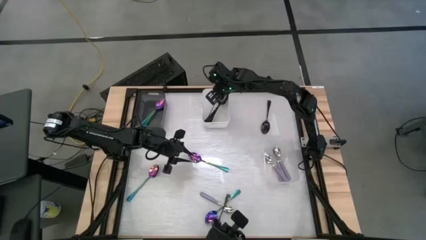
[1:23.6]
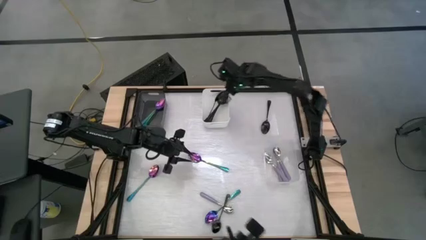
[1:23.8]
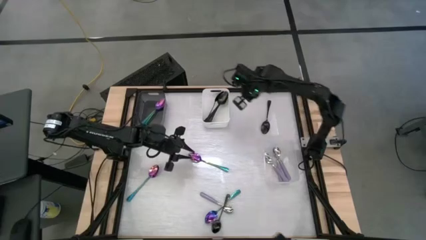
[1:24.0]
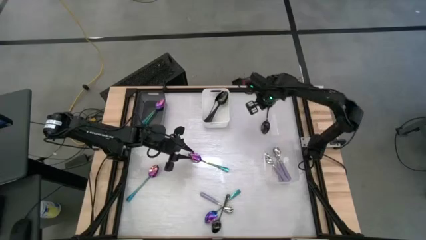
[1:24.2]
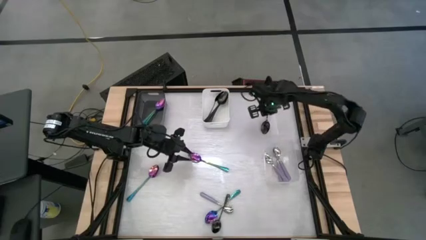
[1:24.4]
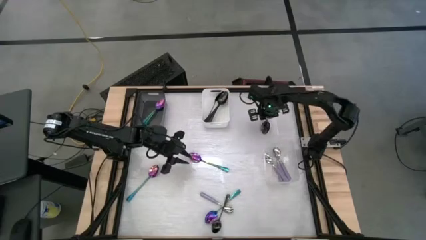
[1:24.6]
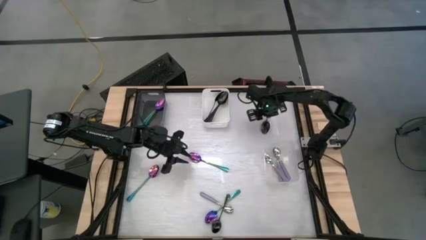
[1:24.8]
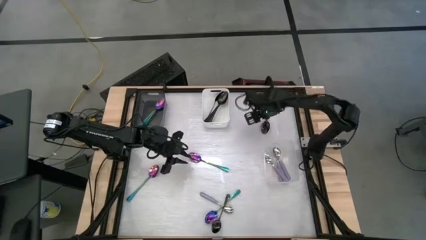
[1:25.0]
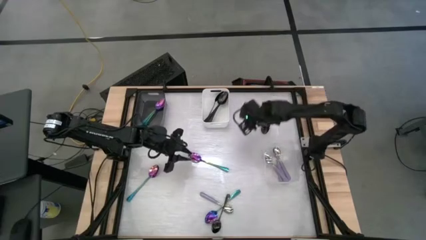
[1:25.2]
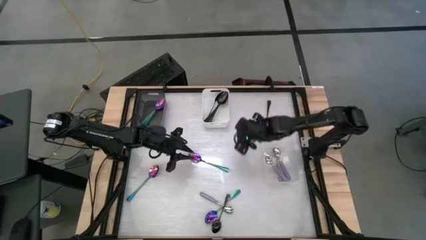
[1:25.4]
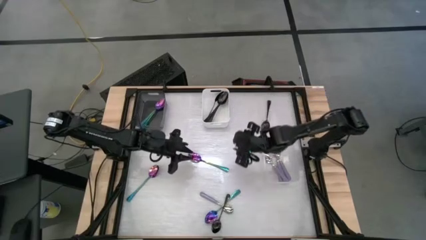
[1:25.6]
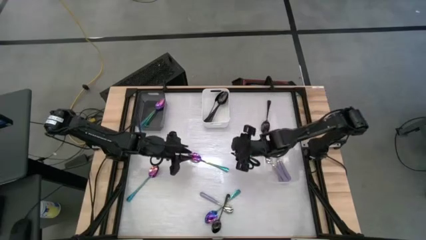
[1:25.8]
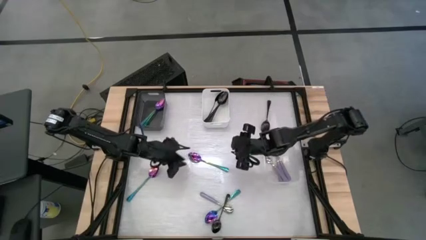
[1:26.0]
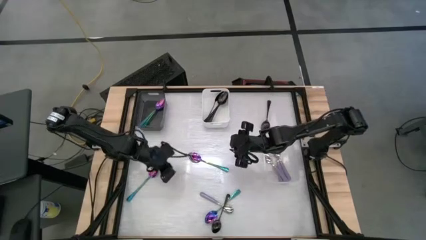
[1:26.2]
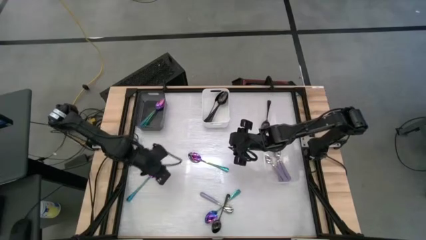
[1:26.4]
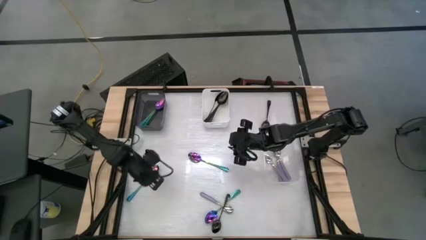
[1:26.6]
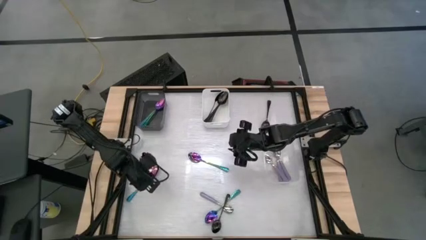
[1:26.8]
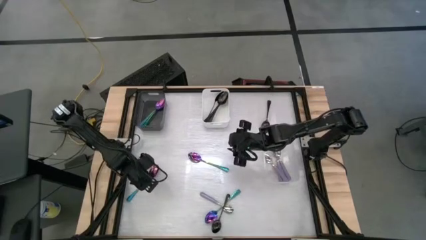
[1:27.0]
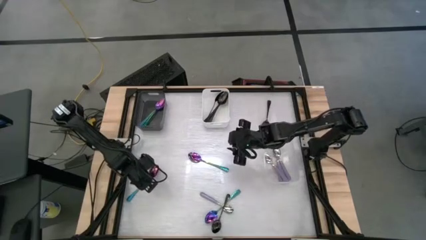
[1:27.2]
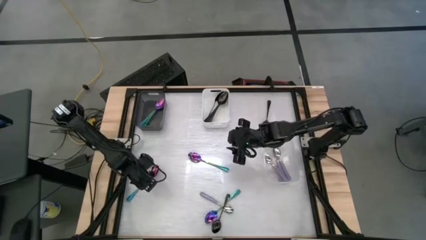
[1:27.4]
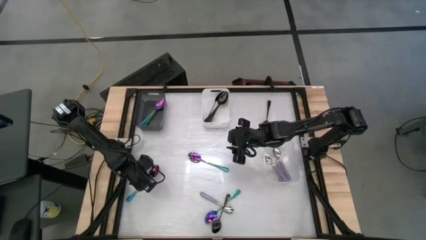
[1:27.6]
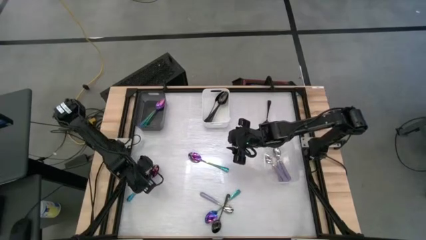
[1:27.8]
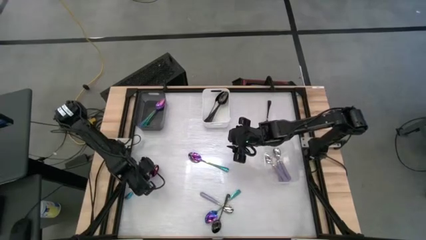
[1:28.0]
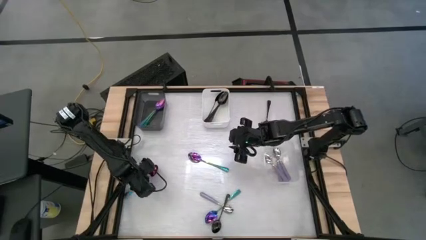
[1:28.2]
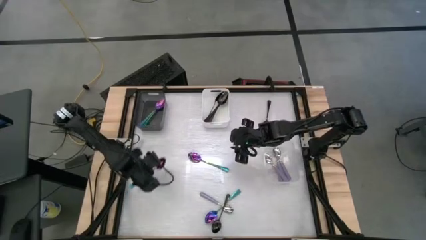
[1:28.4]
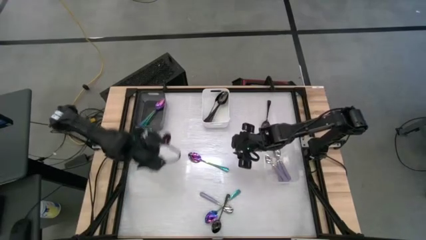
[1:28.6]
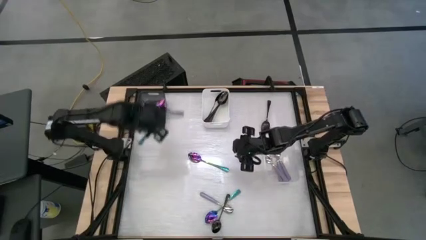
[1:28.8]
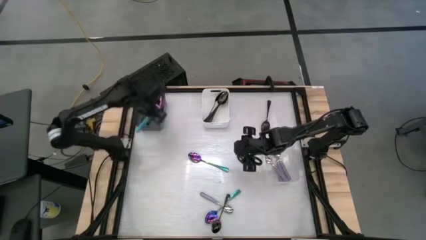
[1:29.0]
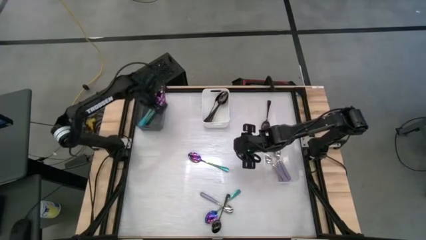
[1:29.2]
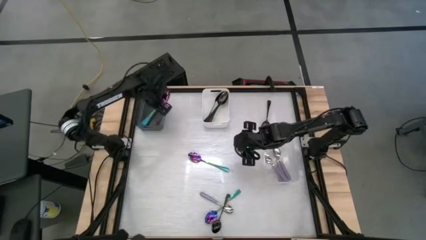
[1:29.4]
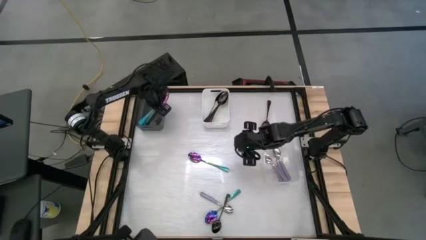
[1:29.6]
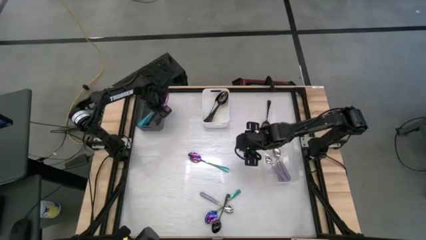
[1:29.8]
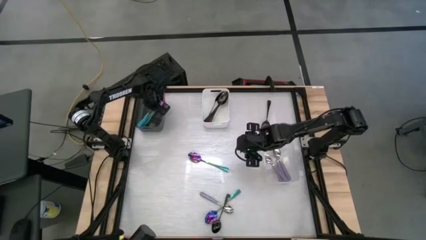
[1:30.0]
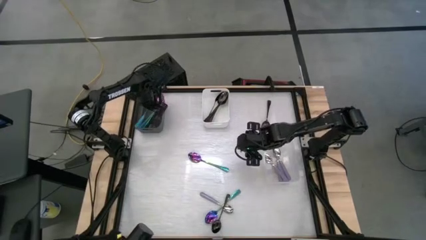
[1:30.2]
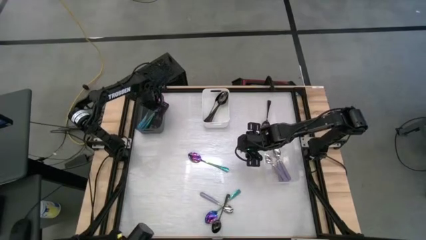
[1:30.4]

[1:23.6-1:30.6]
Task: Sort silverware by color (type)
Put the blue spoon into the black bin

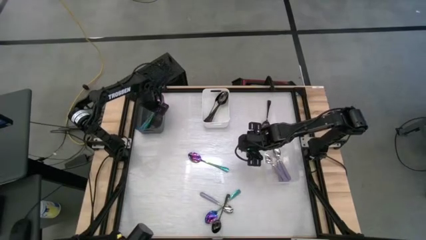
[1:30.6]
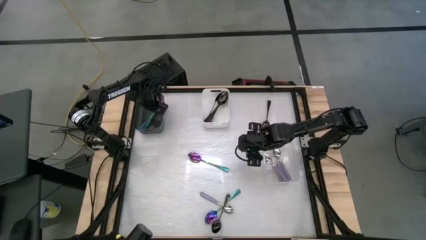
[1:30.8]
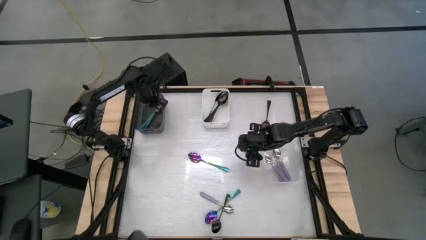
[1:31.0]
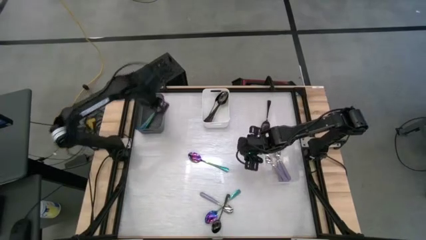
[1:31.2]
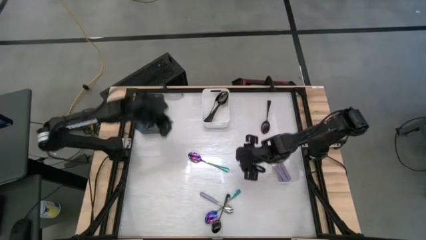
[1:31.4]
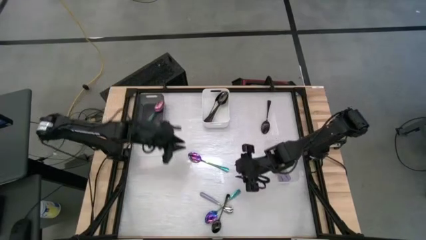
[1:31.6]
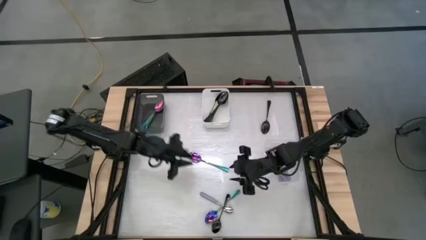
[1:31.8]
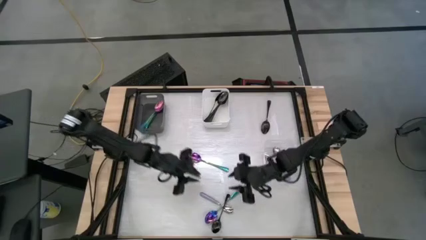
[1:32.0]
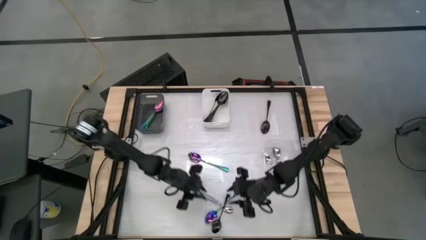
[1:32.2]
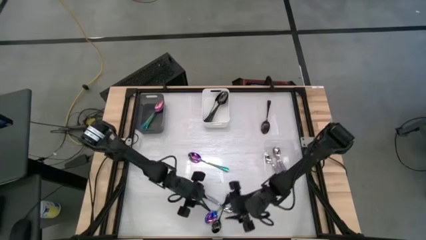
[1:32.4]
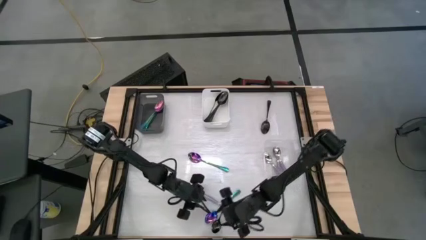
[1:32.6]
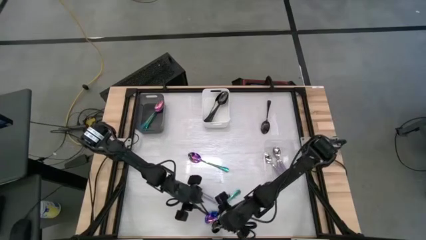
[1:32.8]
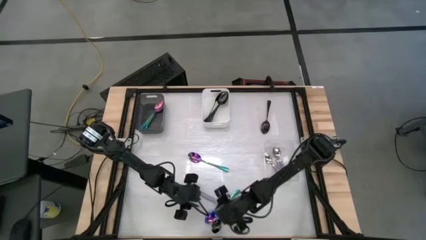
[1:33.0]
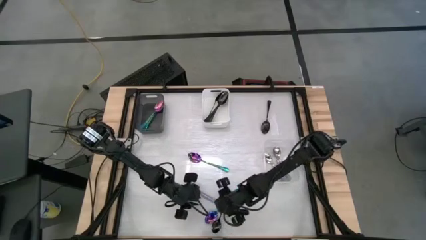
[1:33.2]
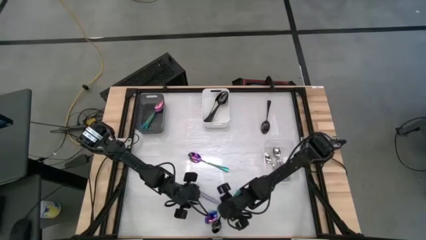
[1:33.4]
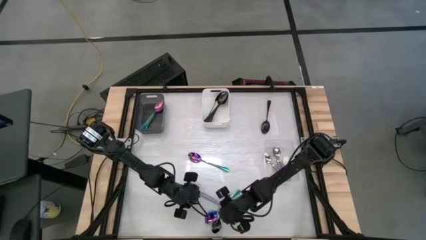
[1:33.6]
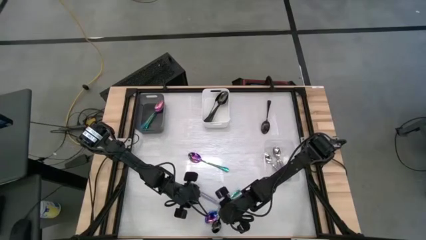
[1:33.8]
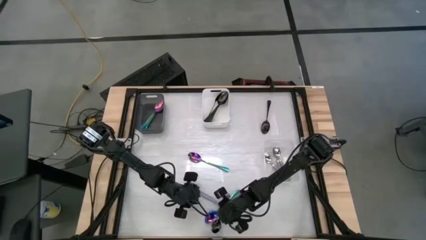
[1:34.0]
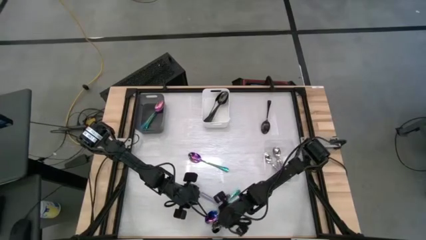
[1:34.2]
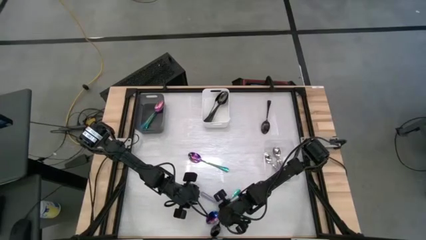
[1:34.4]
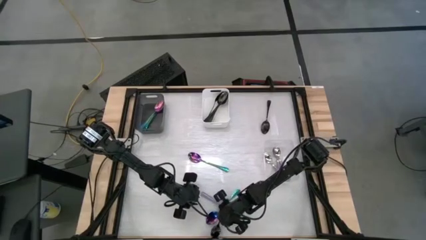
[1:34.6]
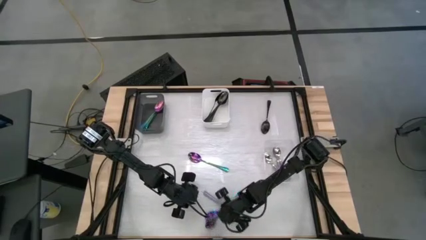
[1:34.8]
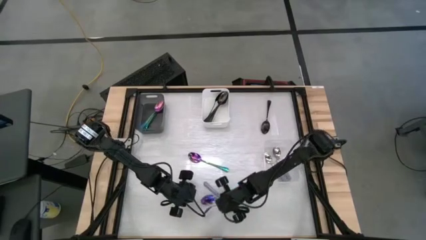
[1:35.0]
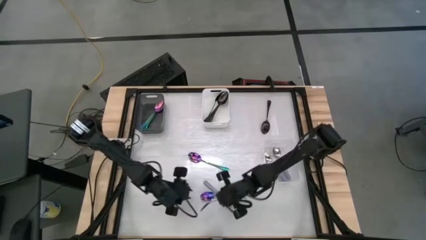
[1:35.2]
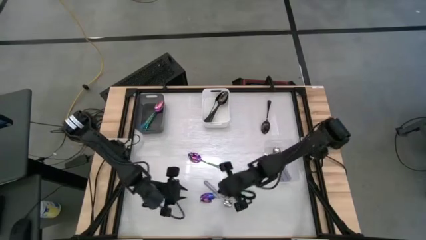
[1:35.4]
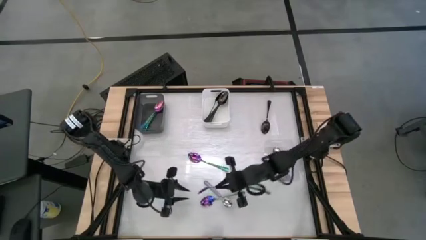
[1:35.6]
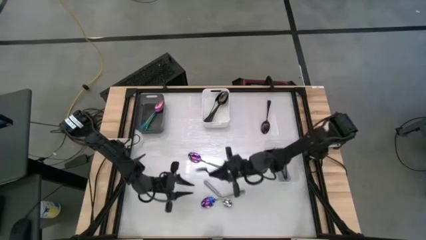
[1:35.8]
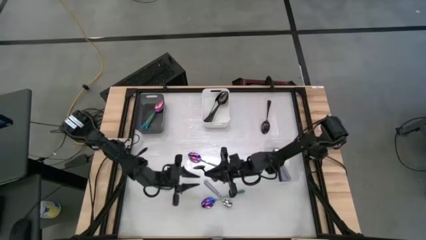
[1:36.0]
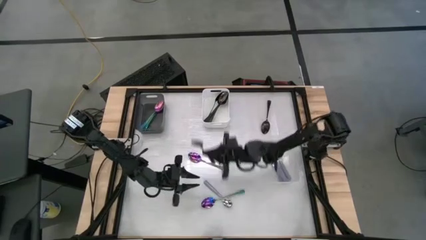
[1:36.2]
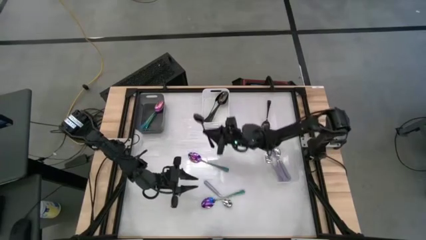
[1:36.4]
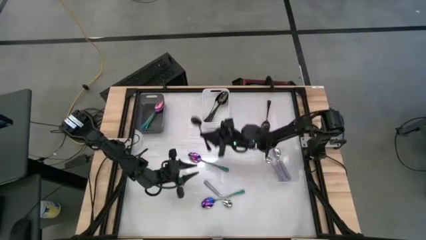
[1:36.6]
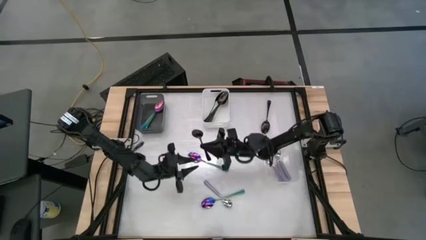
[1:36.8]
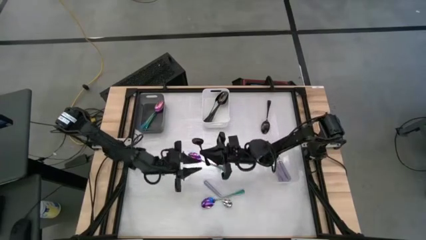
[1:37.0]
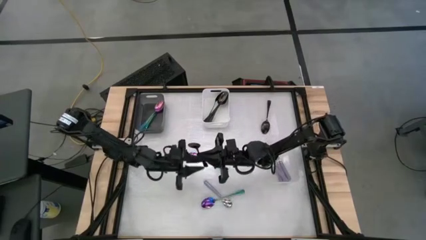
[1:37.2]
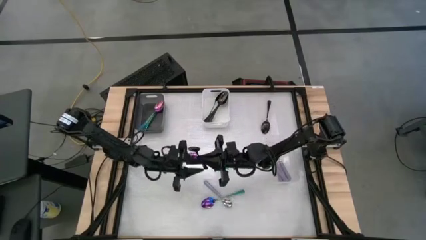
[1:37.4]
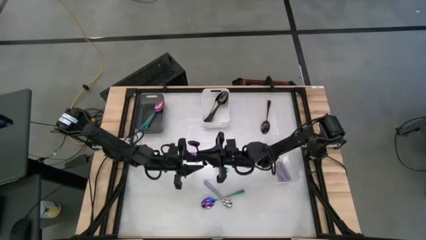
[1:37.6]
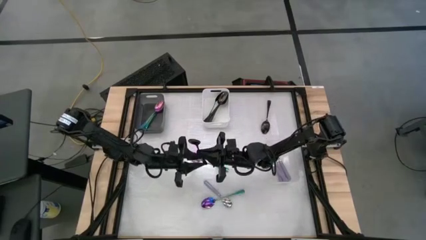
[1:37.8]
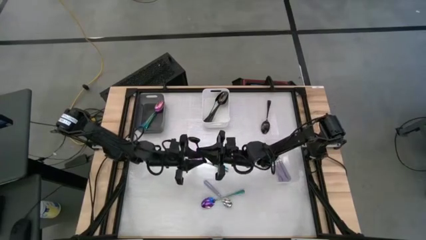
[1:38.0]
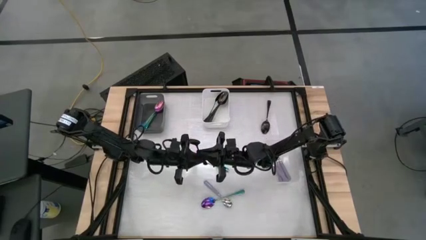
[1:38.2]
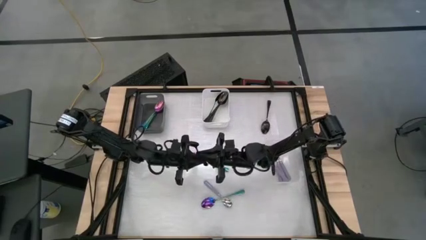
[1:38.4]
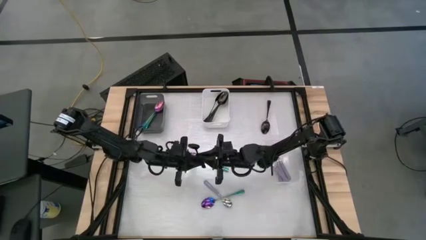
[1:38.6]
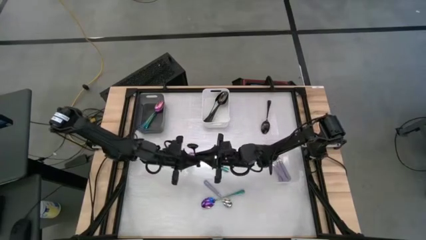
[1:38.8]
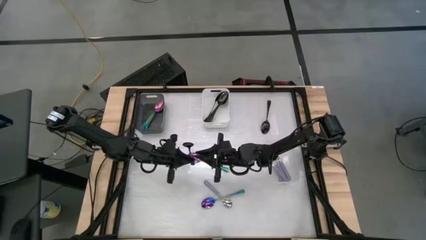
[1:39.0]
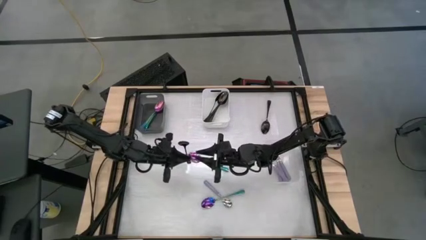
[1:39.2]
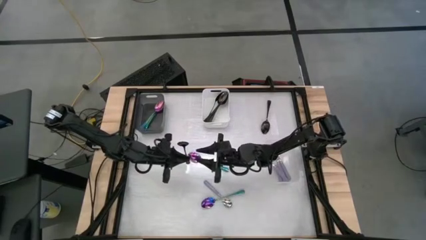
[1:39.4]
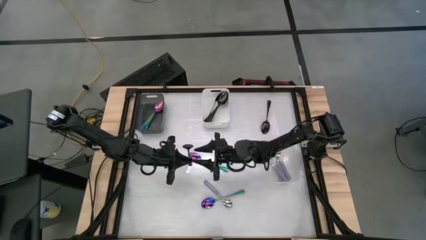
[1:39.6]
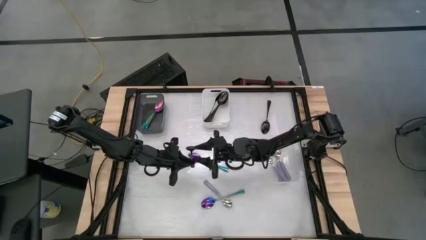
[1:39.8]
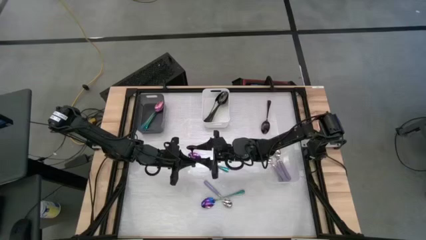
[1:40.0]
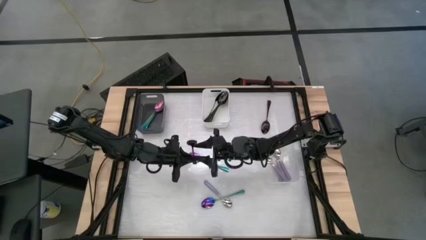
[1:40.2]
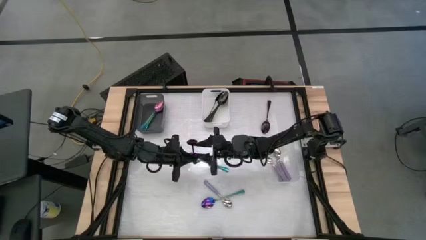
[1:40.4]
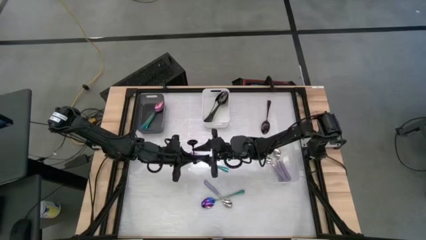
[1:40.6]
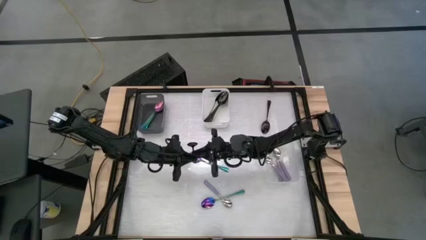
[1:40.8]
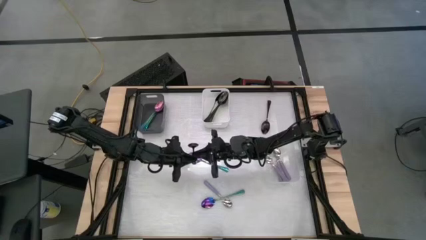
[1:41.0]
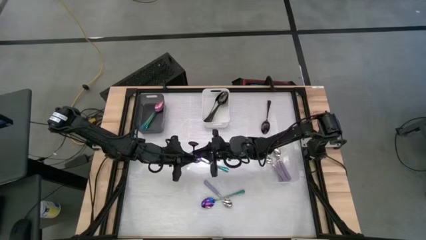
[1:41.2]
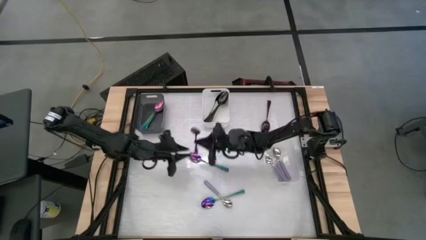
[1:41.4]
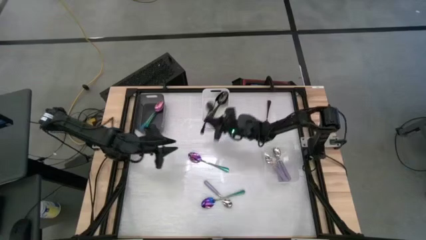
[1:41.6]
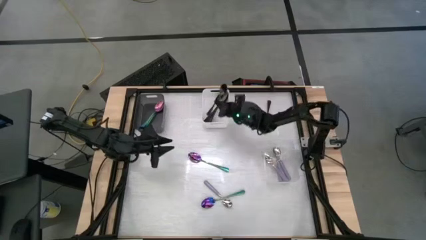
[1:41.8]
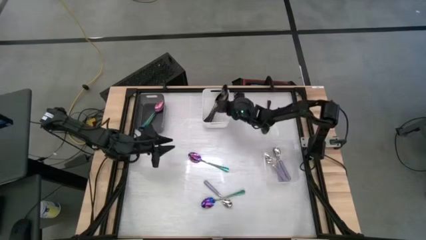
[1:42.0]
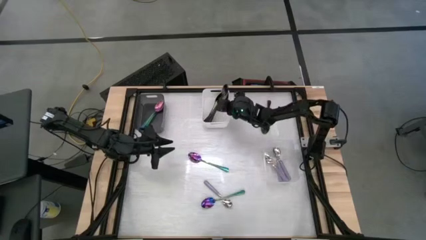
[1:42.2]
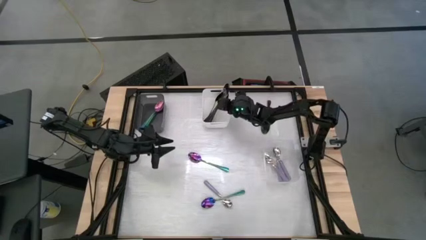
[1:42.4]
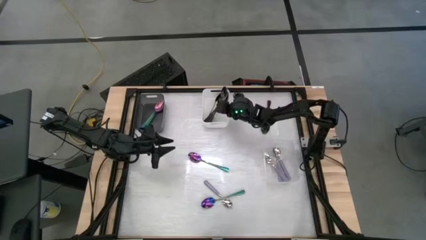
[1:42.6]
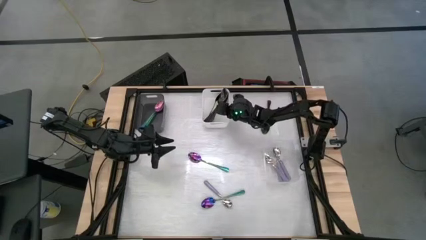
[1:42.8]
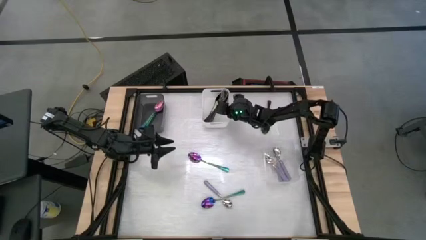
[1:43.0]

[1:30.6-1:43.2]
Put the black spoon into the white bin
